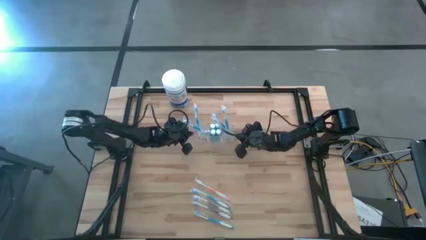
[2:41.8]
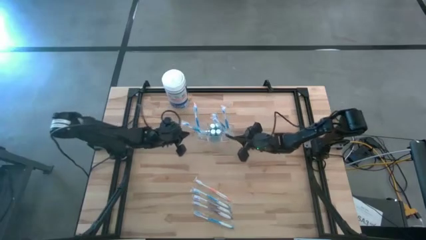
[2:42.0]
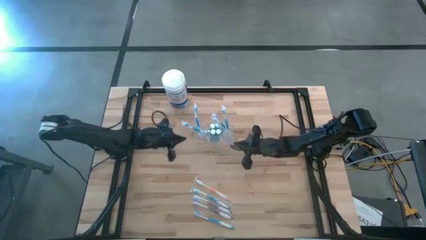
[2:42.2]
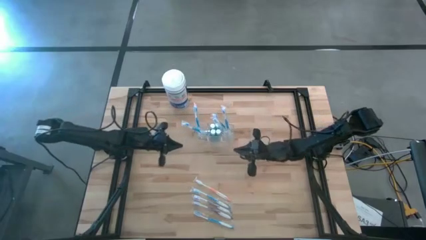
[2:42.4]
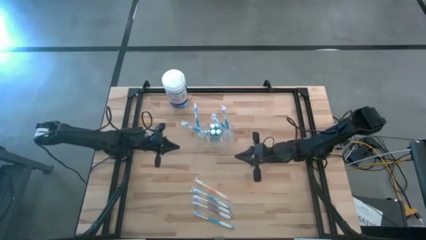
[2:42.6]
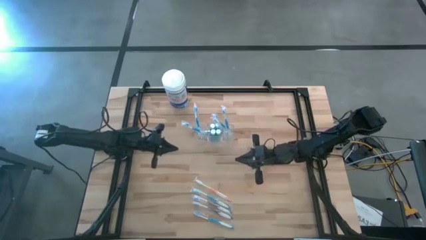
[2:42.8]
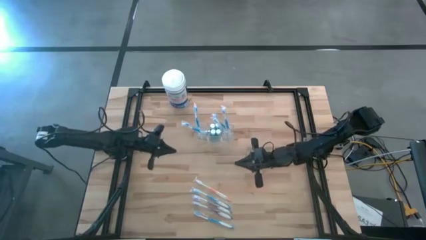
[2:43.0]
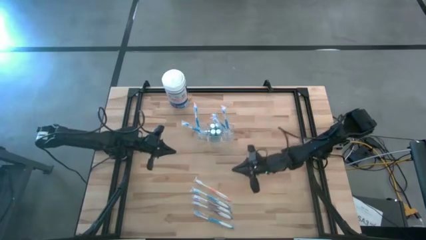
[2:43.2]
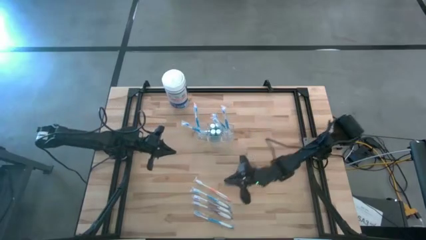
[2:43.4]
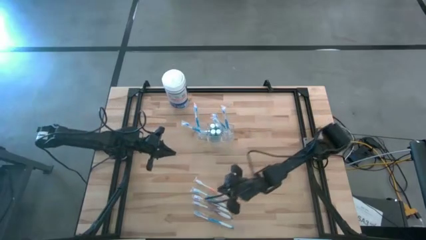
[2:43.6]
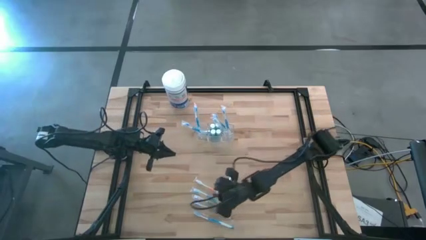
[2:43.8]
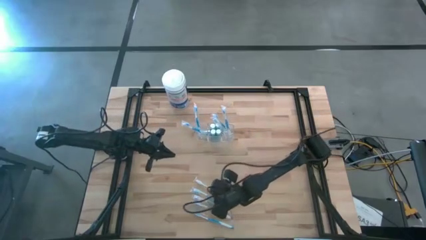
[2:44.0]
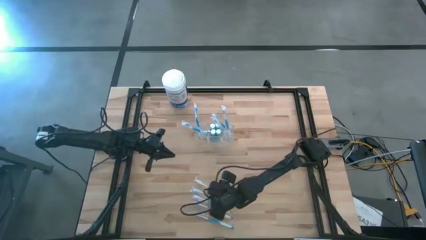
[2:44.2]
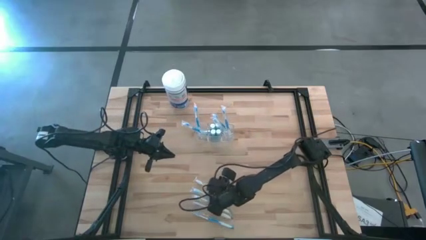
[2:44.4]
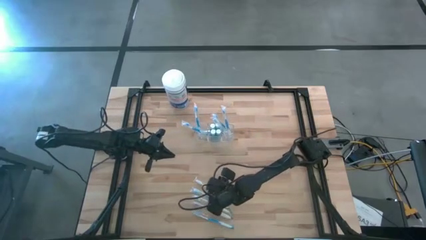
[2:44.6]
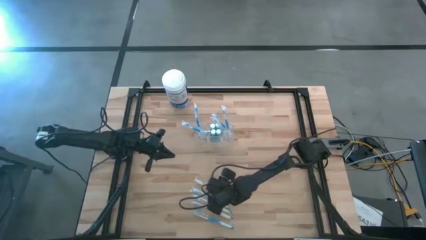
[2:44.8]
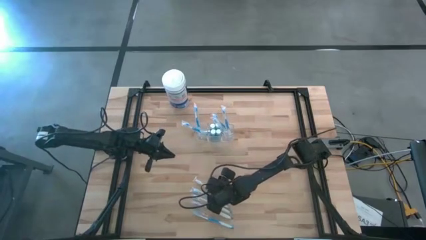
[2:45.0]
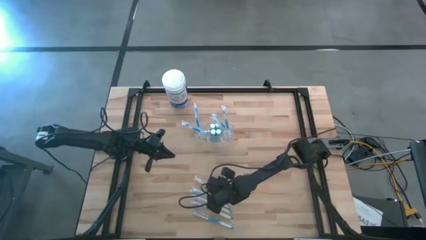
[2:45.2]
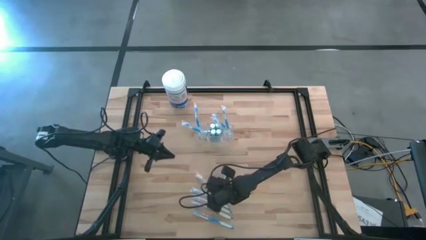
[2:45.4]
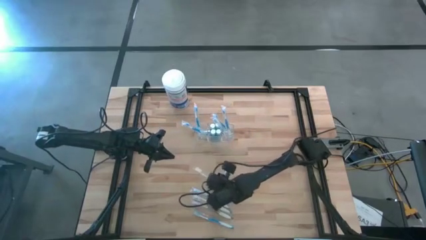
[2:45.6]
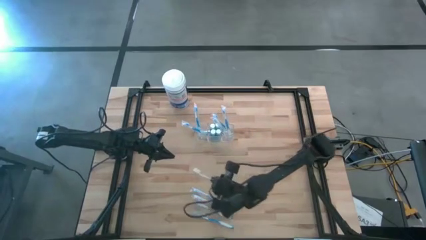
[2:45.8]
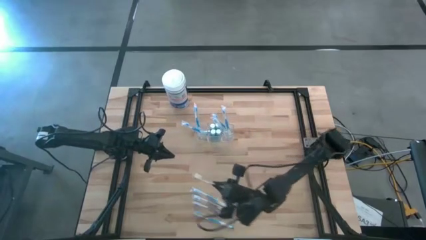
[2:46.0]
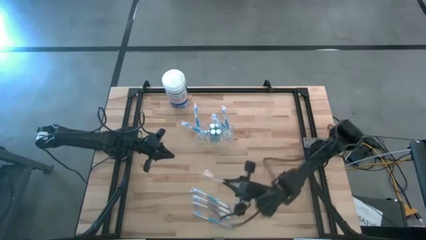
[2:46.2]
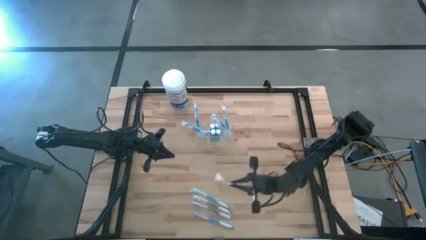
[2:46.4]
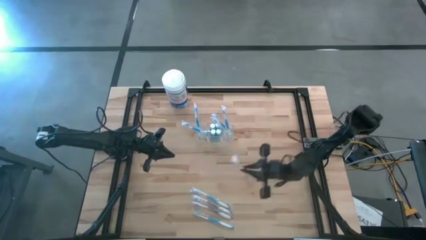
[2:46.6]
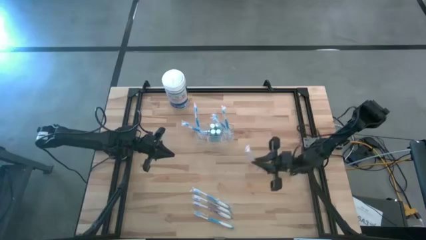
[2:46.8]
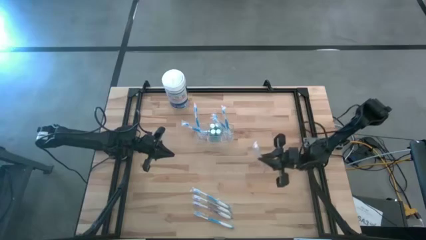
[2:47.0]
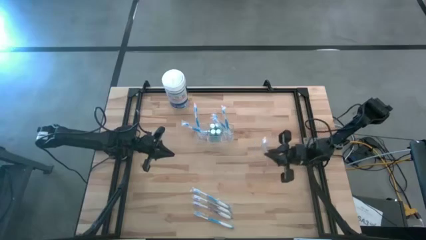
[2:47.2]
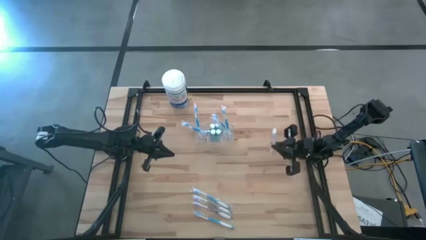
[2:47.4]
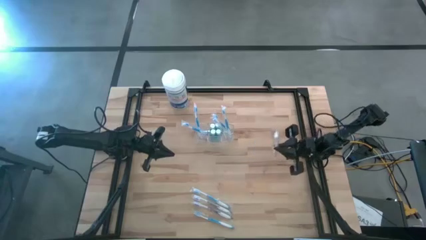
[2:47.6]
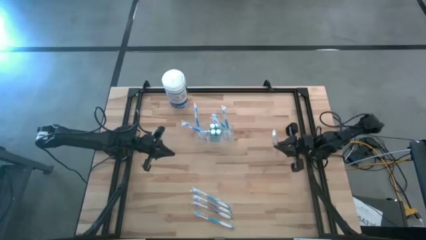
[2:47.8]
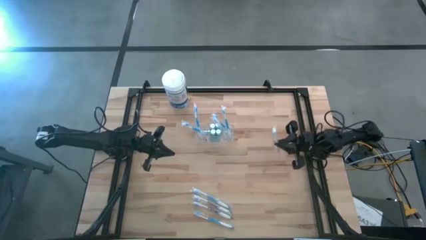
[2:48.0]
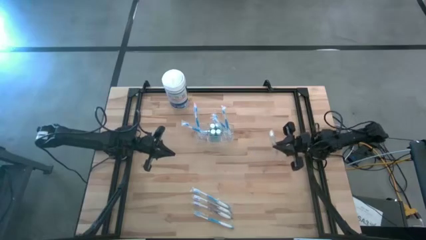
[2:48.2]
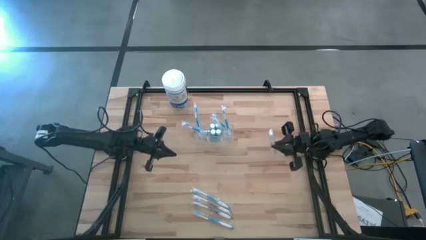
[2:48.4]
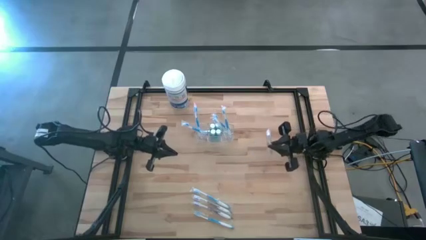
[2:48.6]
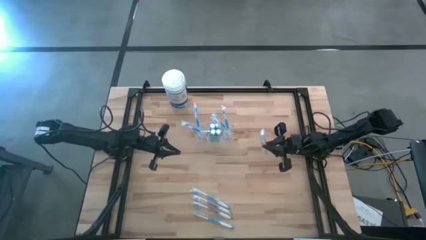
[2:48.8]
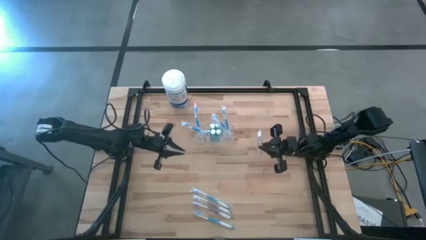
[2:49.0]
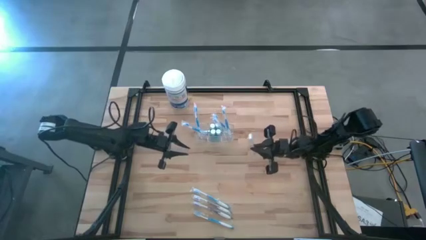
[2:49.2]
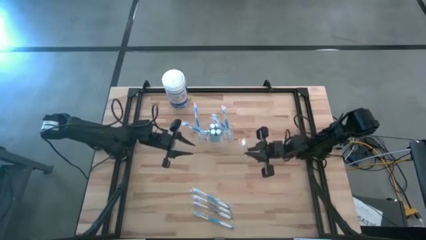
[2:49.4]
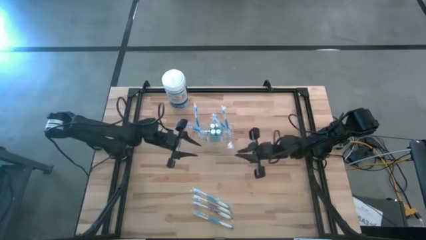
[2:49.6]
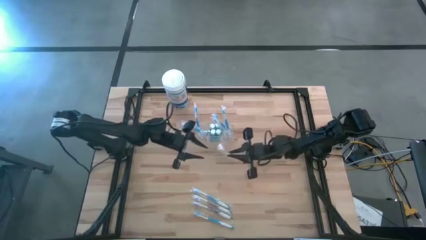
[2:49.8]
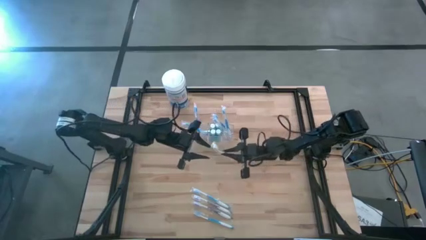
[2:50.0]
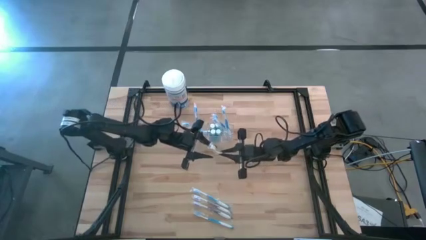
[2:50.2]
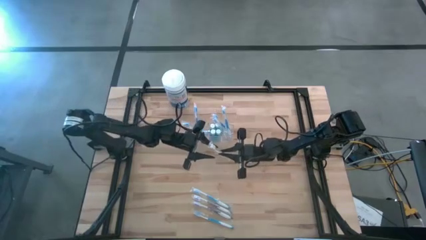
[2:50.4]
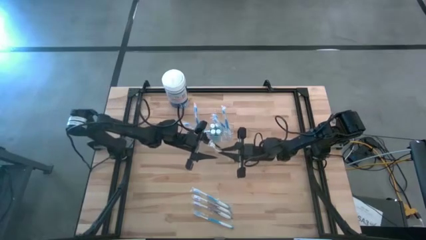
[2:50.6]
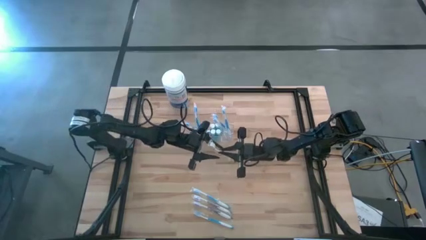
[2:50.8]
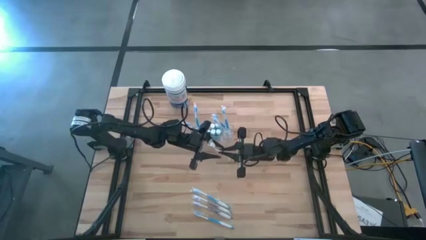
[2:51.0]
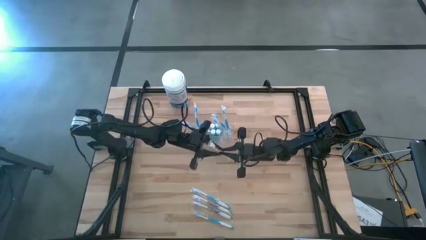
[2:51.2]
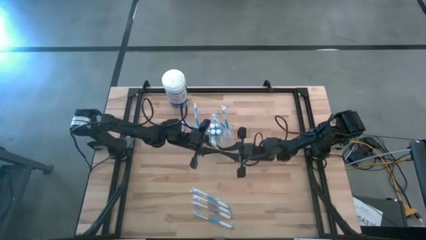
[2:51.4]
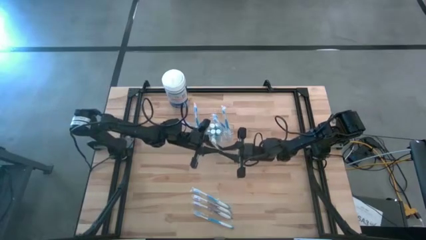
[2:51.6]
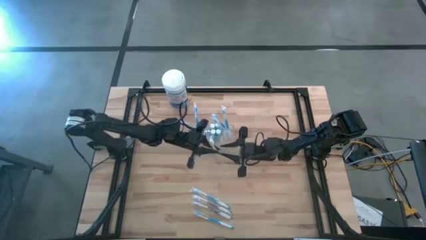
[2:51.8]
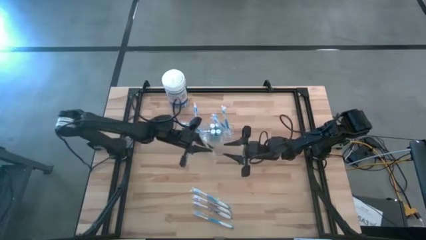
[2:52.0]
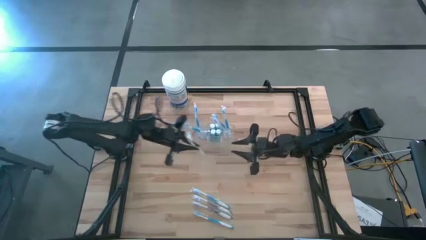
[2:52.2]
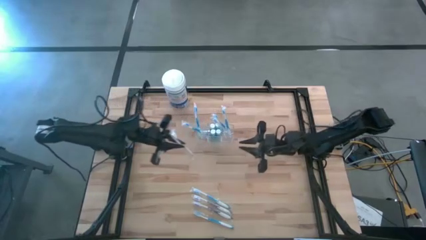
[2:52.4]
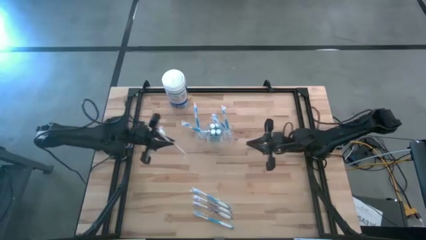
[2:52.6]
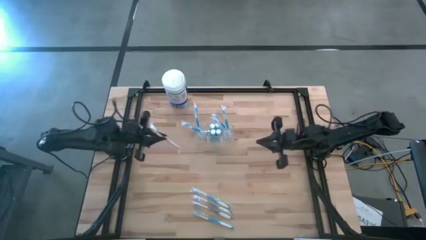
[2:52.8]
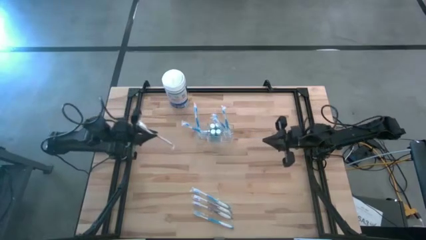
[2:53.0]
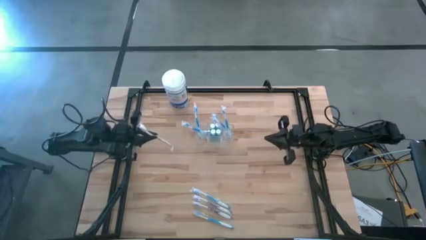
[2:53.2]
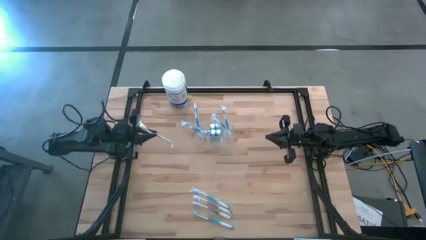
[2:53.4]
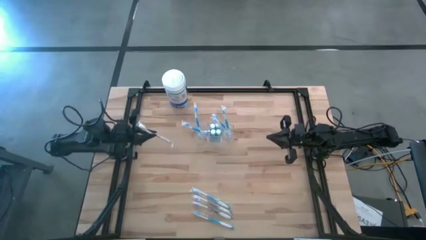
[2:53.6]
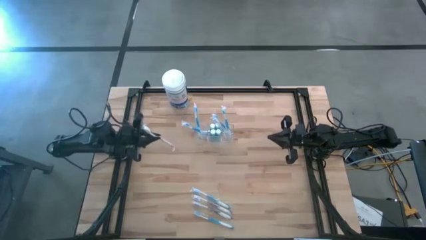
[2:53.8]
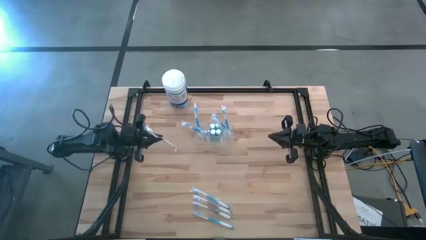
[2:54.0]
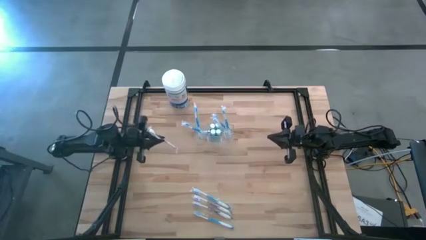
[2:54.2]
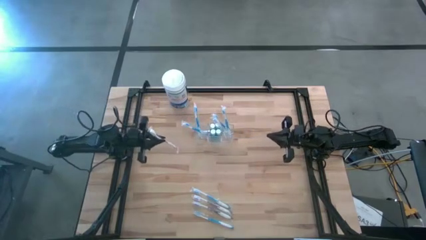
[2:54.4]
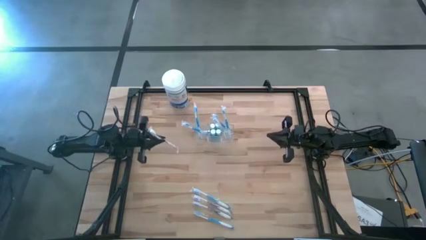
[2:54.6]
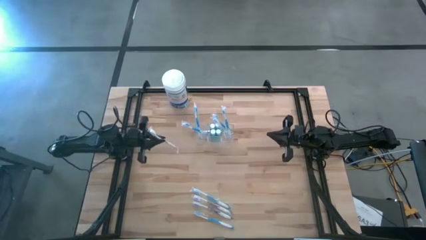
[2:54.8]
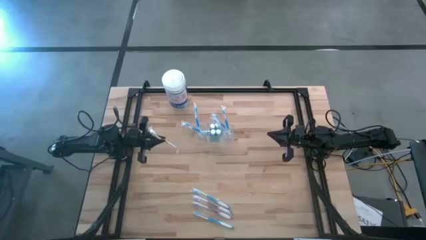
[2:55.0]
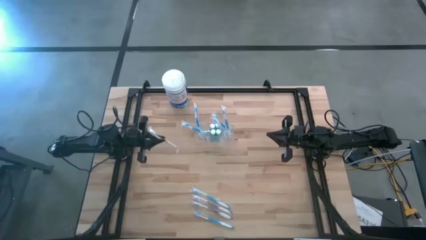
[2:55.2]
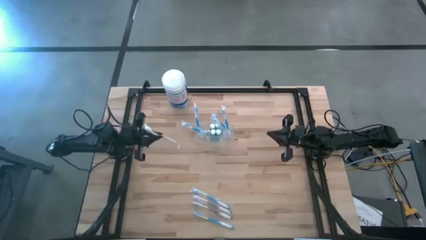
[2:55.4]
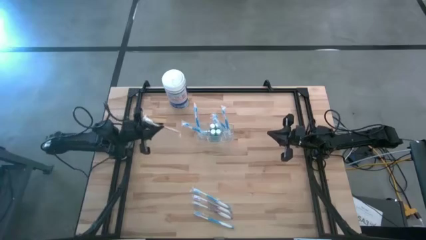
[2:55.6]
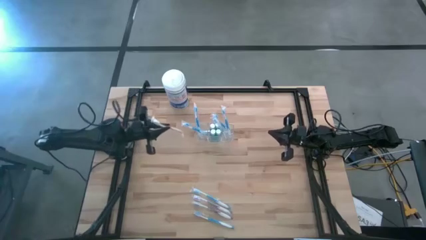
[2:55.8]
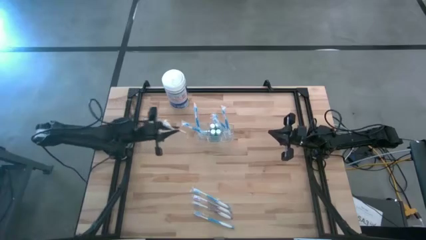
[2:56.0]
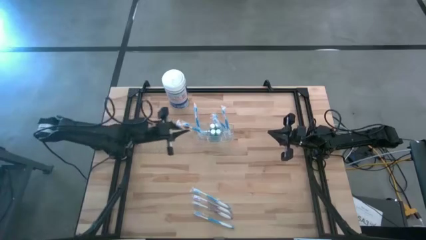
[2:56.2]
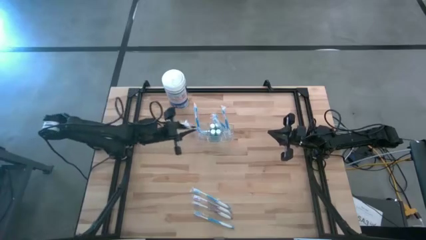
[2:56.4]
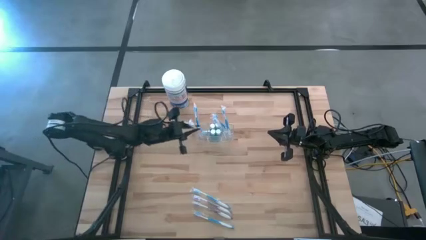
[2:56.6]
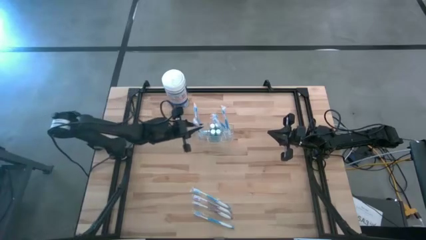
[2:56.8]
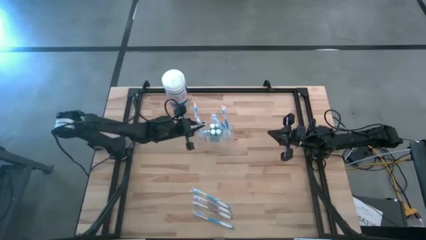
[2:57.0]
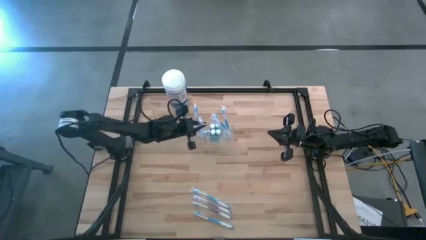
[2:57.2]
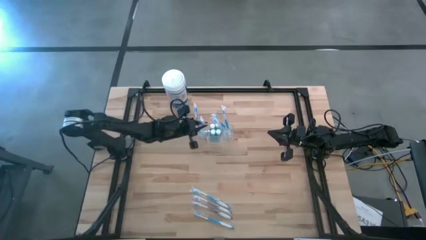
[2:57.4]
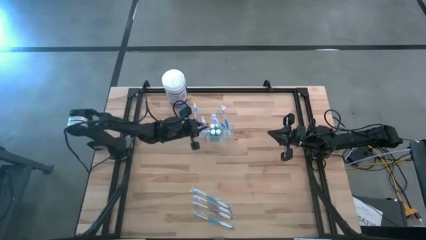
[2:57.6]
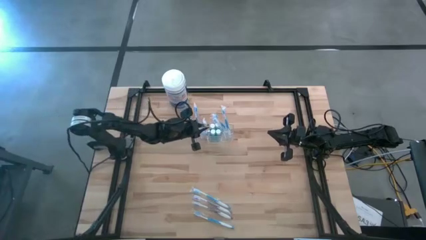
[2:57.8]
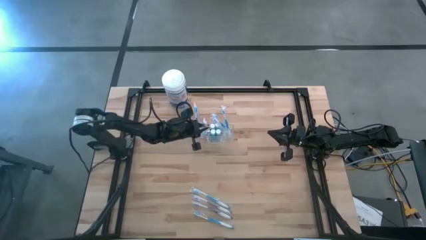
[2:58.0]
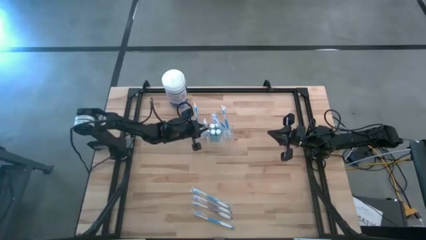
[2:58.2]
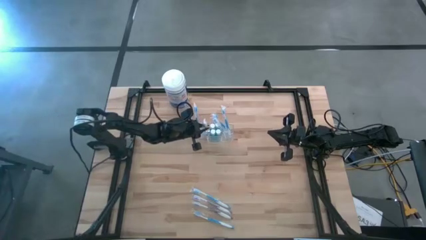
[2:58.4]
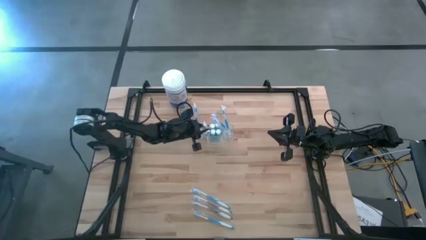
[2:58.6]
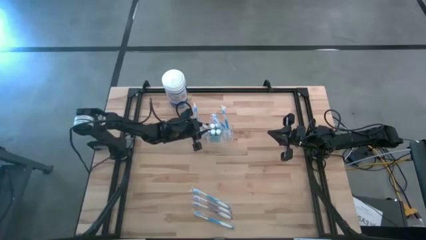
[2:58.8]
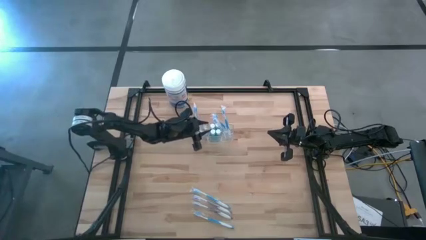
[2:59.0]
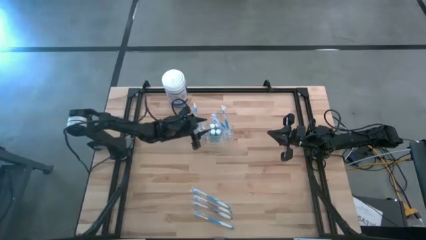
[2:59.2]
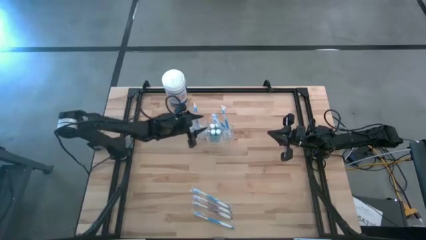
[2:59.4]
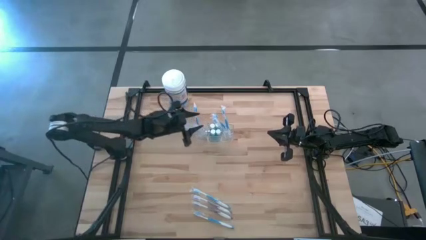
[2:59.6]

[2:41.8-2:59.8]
Task: Pick & Place toothbrushing station
Put the orange toothbrush in the organizer bin
